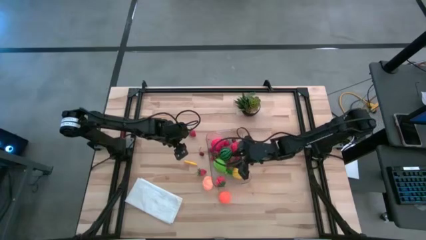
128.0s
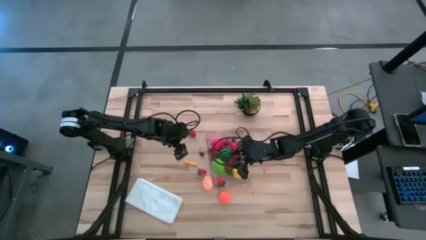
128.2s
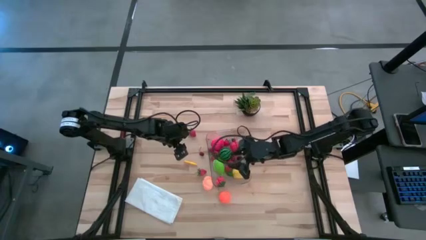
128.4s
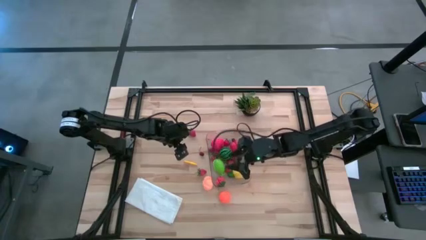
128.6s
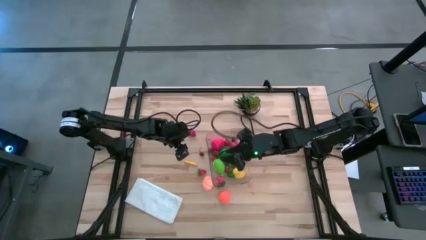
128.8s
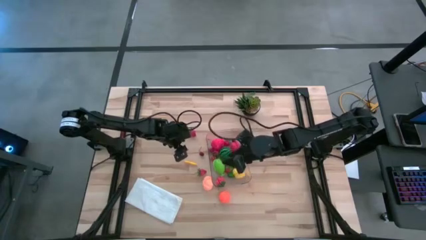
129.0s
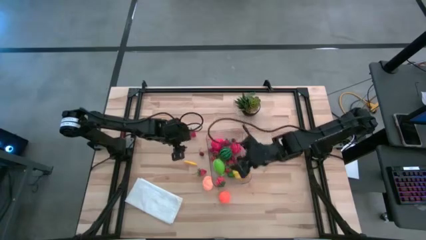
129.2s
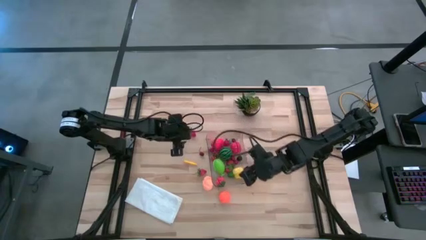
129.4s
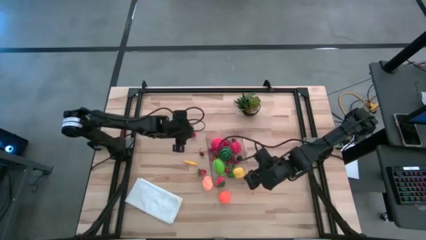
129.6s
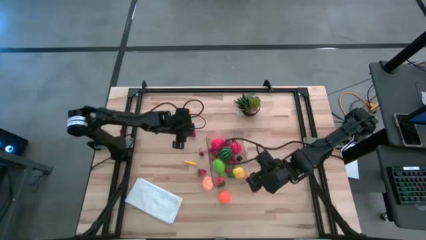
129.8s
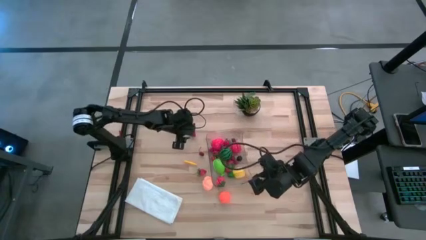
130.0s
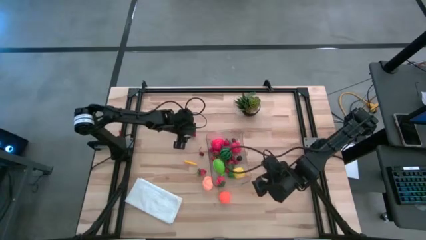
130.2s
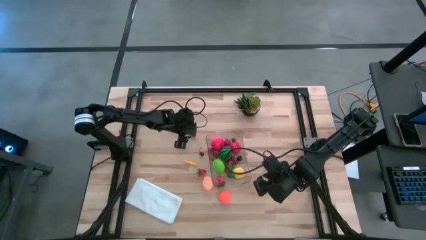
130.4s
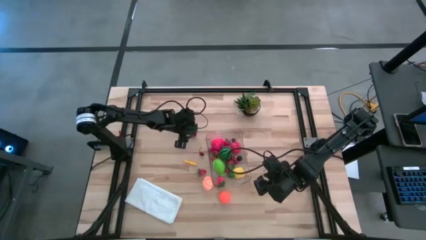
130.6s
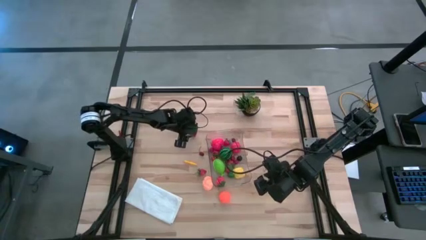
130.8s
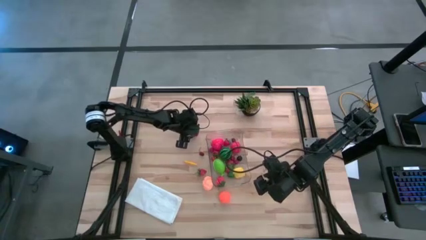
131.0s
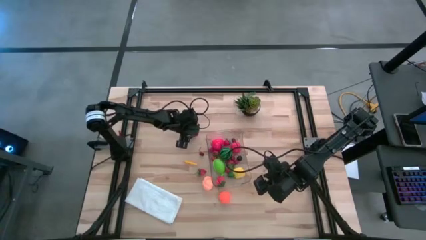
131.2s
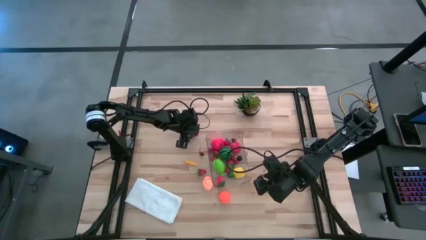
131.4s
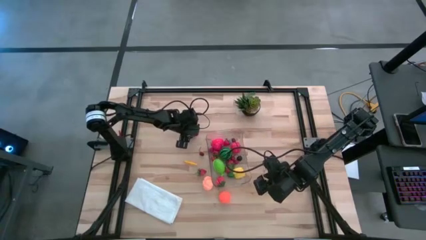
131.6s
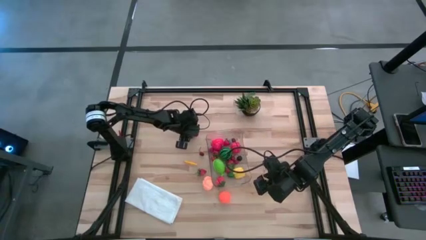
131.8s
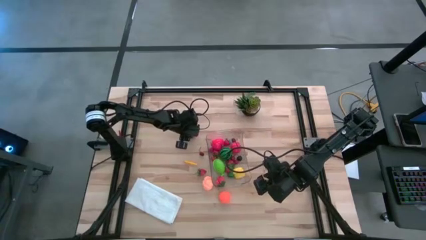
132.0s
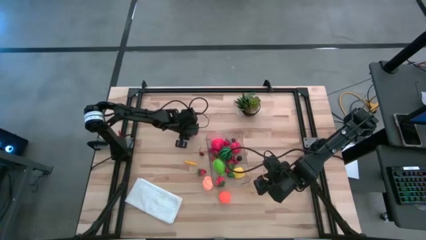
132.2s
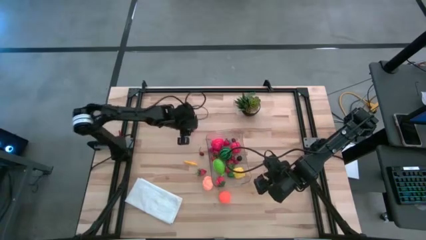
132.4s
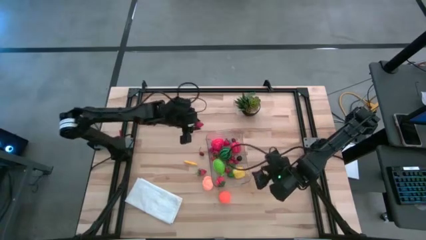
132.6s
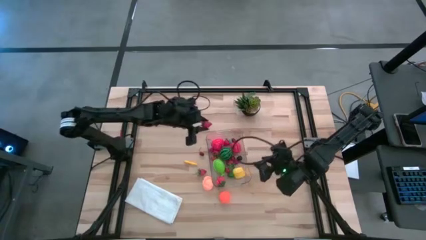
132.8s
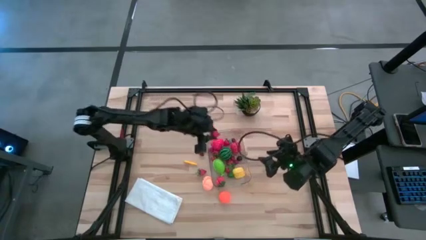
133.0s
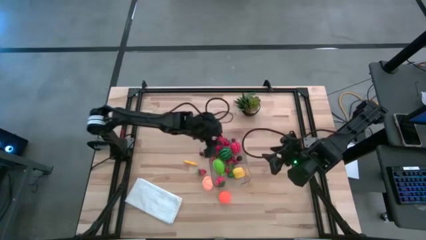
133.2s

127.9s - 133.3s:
Task: Pick and placing Produce into tupperware
Put the red strawberry into the transparent bin

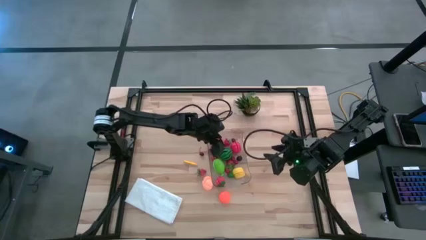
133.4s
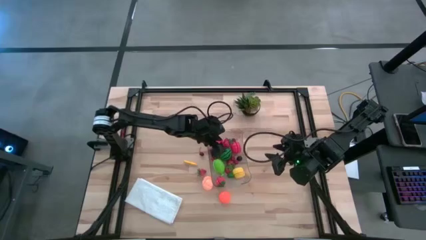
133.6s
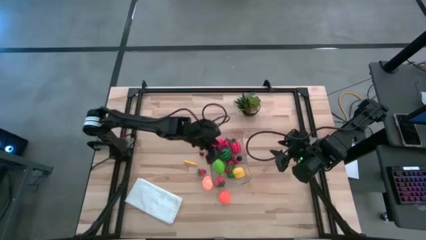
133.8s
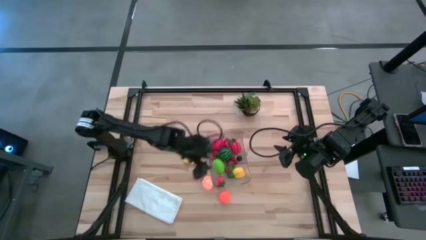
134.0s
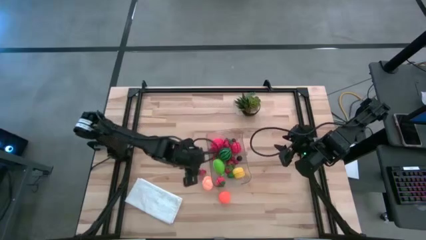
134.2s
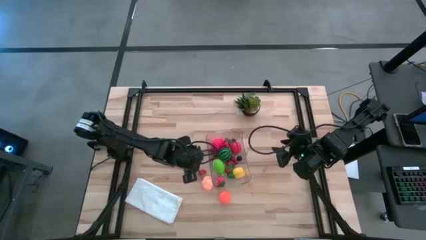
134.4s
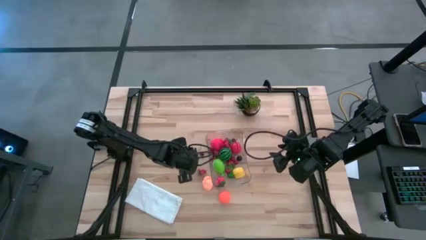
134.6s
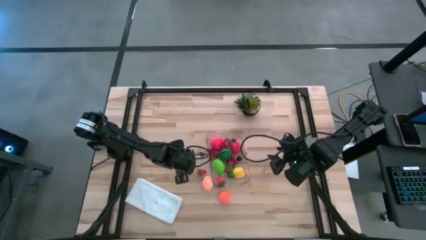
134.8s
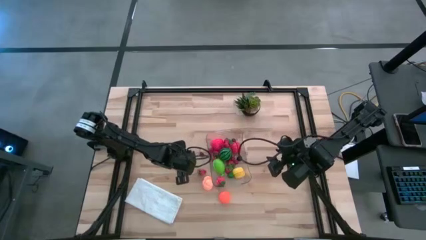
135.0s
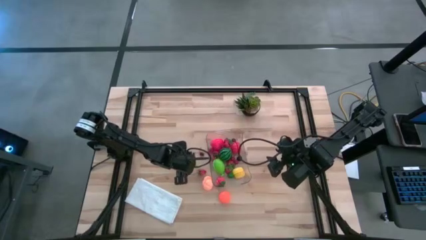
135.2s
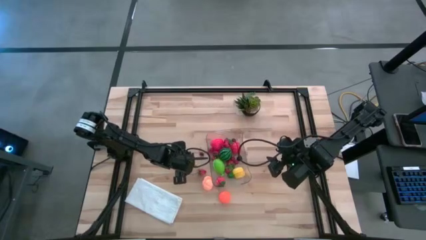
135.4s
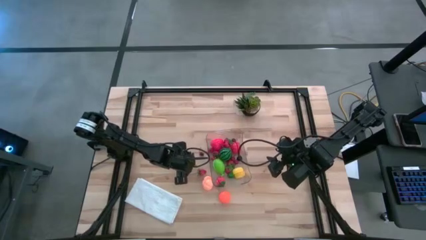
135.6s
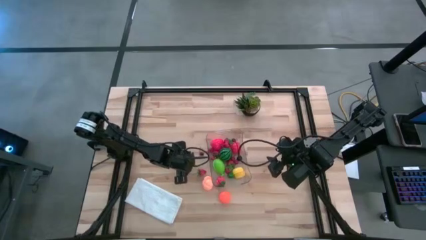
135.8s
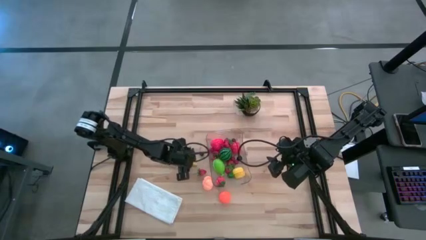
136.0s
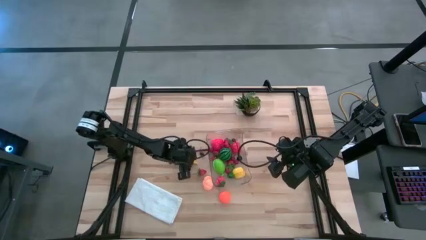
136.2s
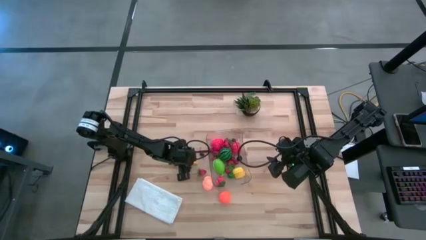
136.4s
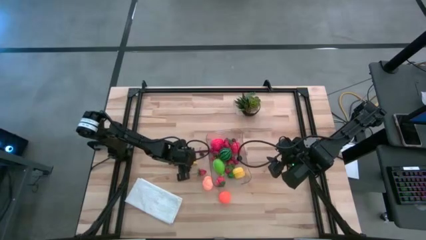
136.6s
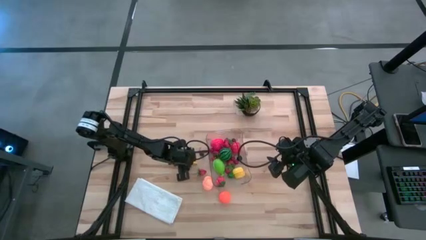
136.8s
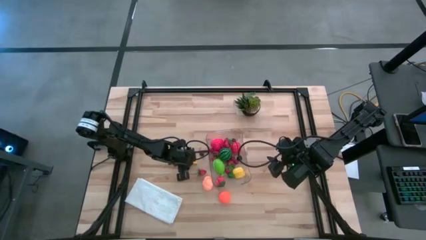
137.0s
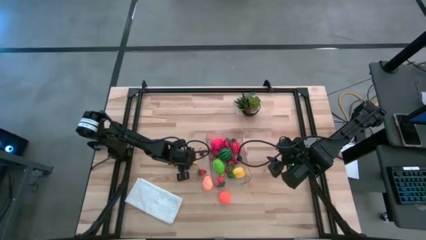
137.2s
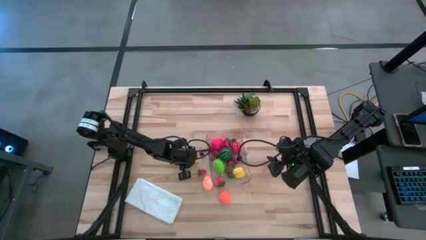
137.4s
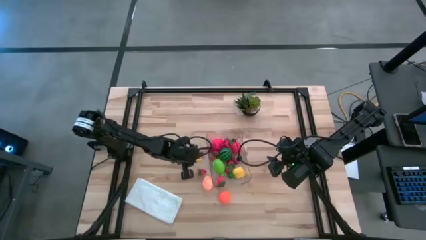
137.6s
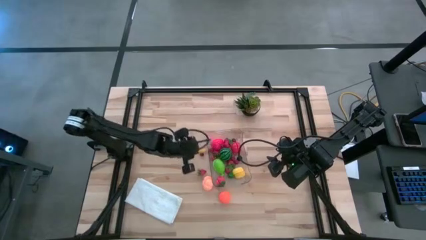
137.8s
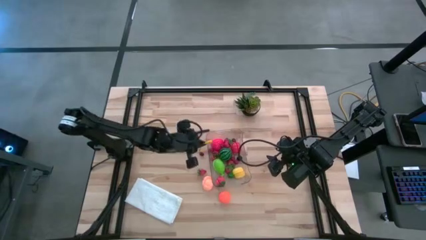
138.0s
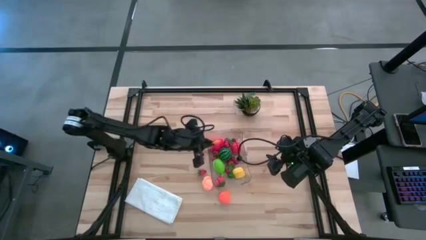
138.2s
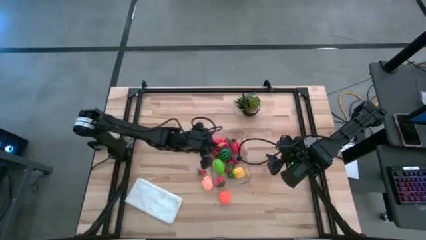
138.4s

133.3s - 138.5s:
Put the yellow corn into the transparent bin

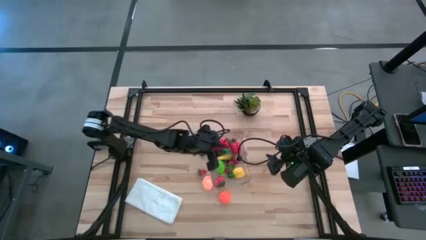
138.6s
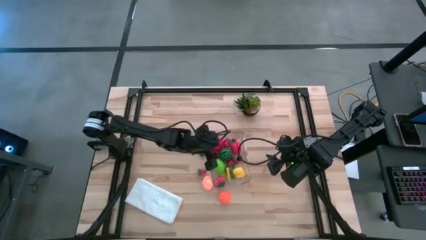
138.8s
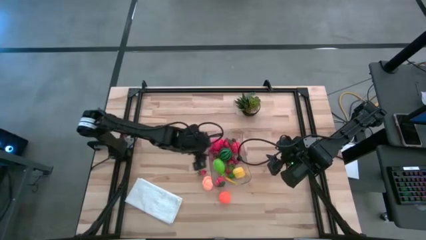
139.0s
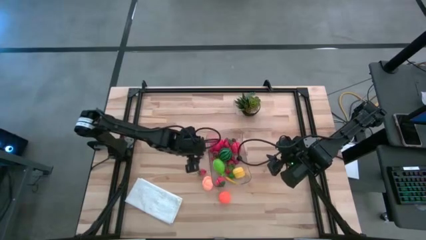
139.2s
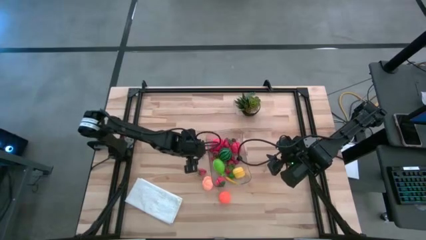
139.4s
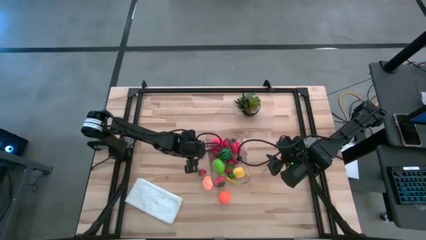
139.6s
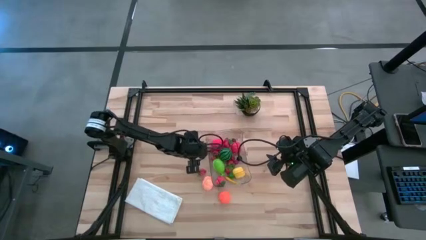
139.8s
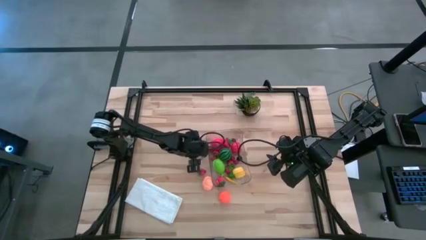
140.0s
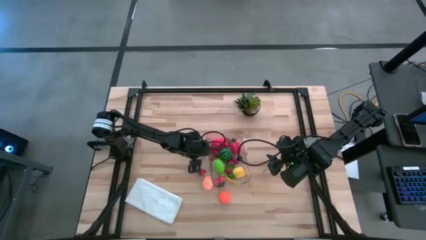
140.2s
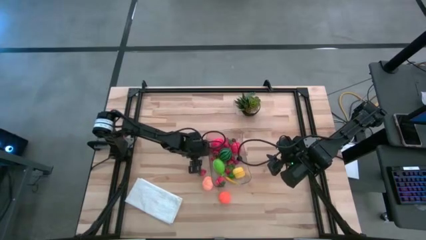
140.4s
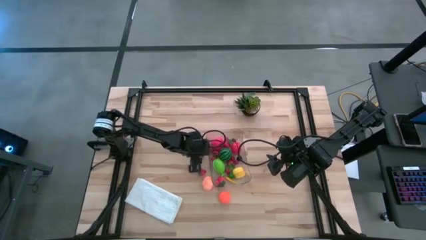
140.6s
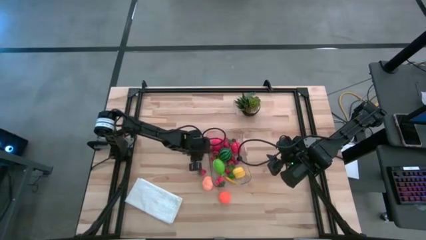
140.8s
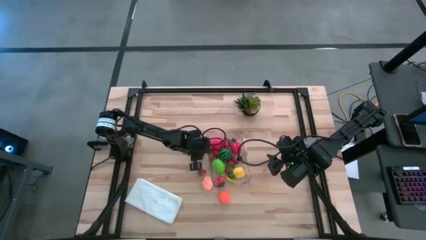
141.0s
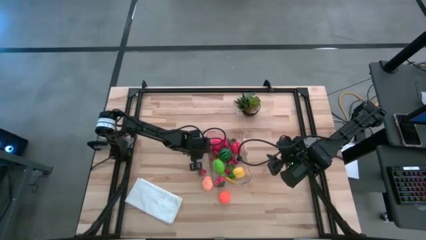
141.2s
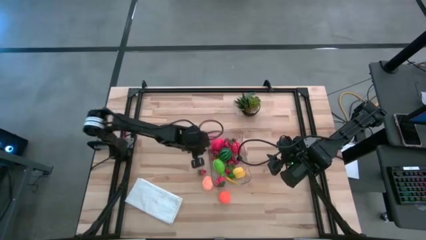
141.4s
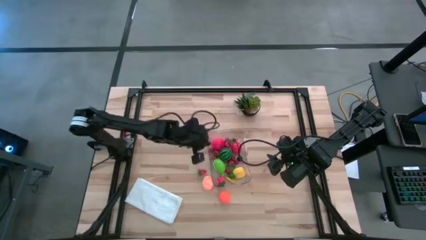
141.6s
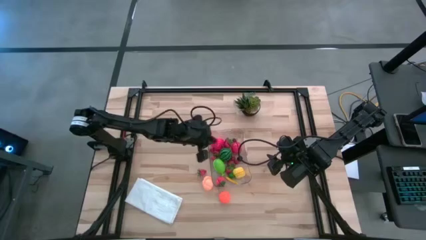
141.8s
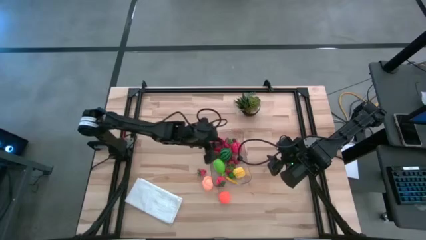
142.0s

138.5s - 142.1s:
Put the red cherry into the transparent bin
